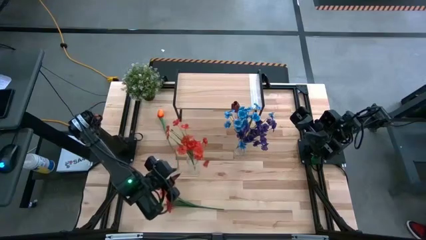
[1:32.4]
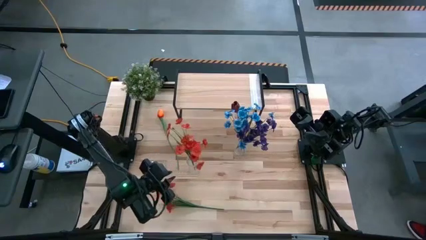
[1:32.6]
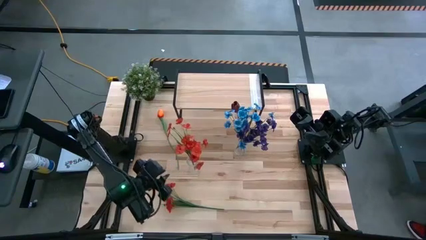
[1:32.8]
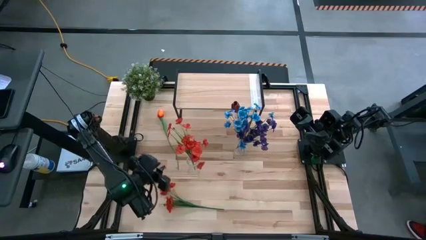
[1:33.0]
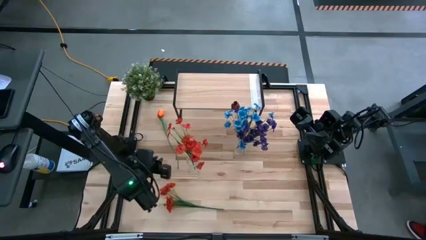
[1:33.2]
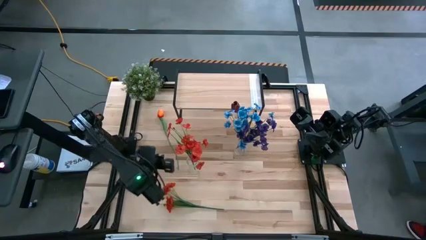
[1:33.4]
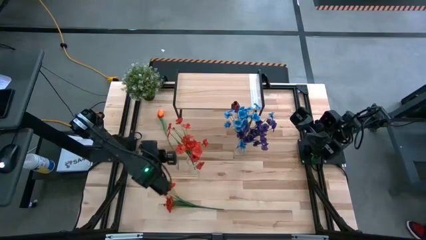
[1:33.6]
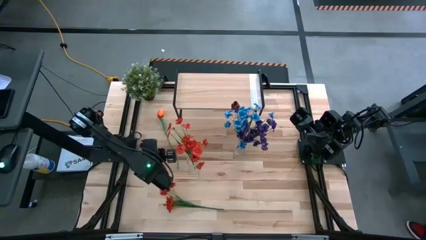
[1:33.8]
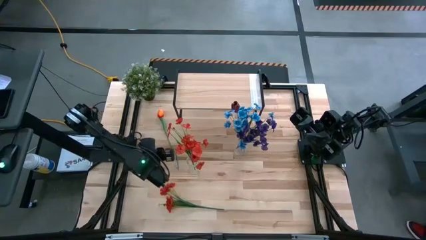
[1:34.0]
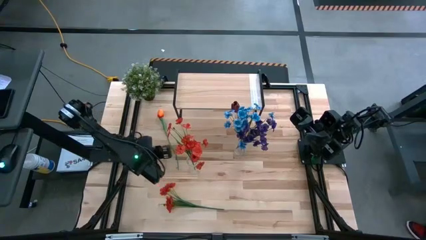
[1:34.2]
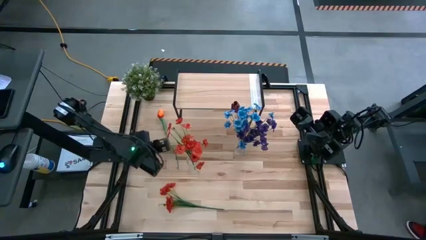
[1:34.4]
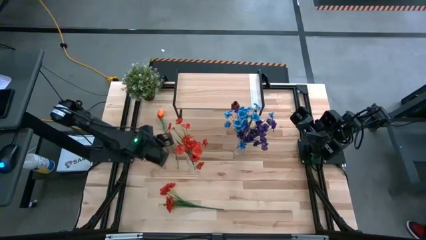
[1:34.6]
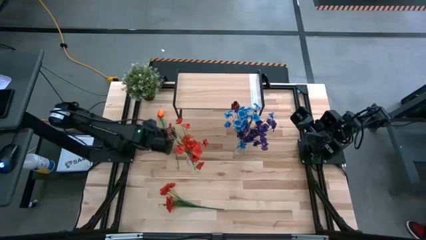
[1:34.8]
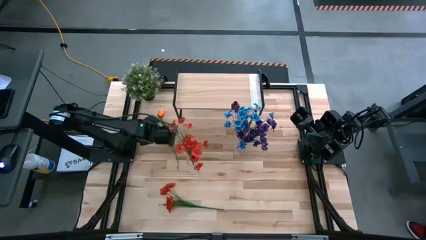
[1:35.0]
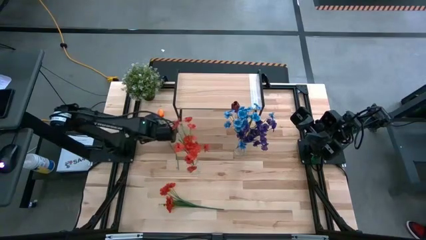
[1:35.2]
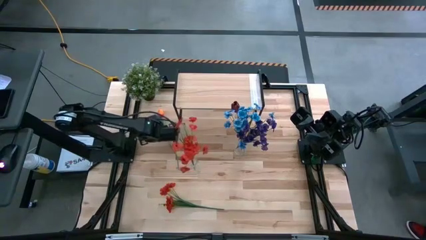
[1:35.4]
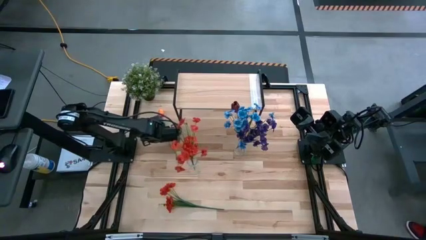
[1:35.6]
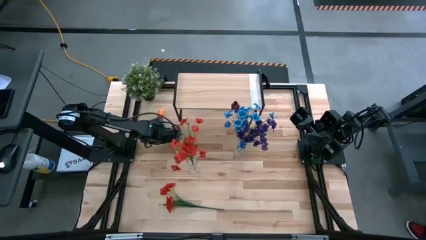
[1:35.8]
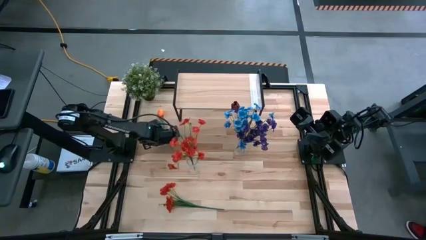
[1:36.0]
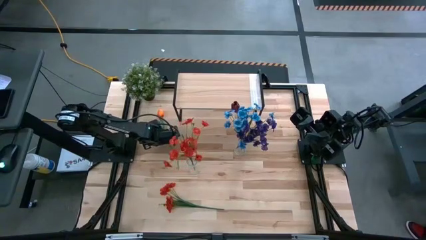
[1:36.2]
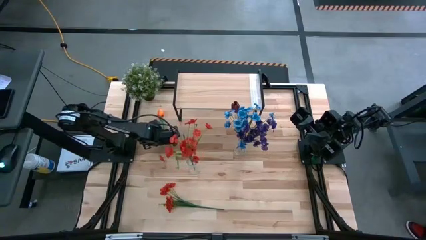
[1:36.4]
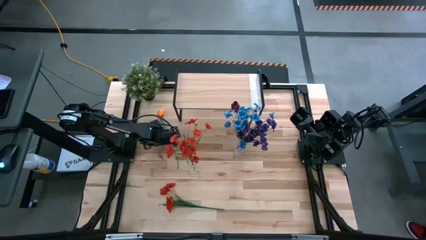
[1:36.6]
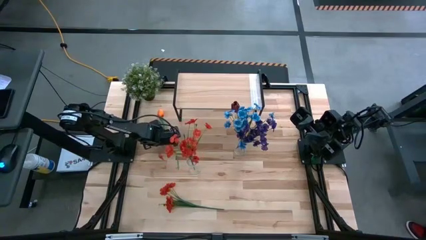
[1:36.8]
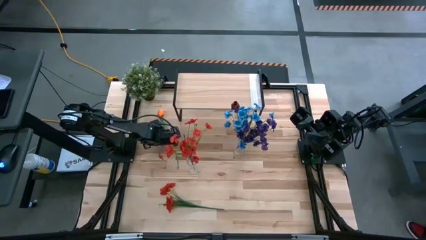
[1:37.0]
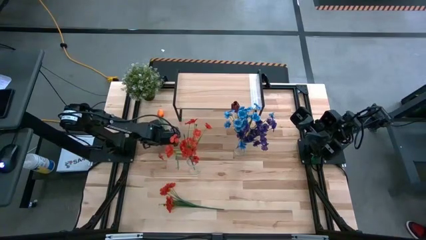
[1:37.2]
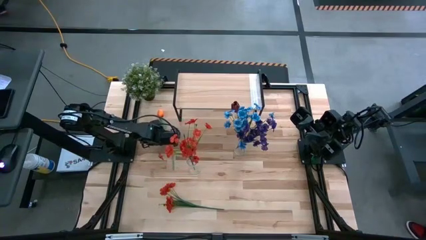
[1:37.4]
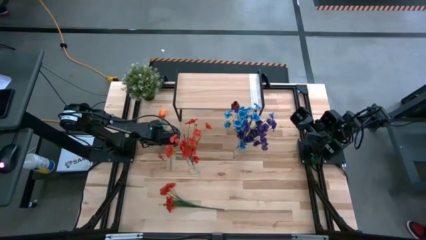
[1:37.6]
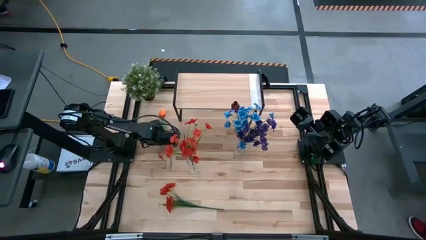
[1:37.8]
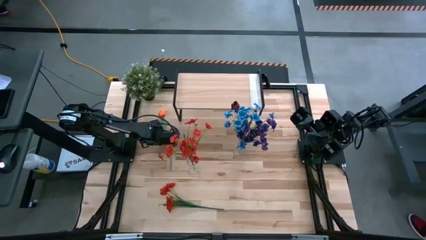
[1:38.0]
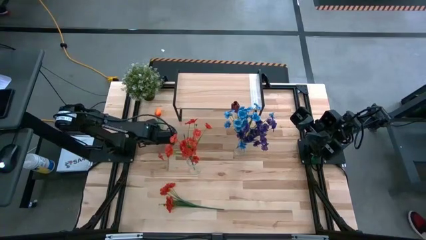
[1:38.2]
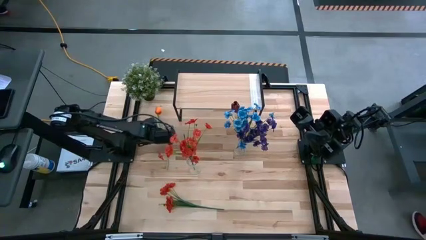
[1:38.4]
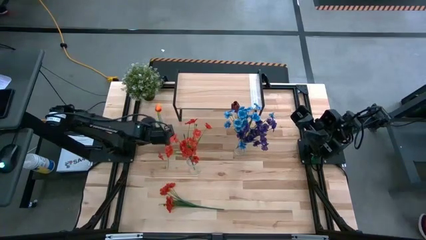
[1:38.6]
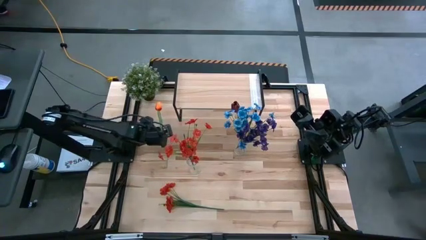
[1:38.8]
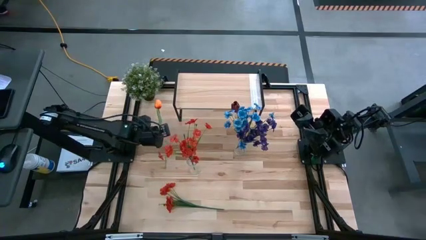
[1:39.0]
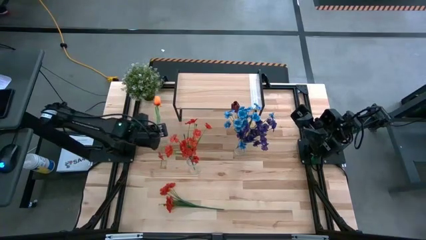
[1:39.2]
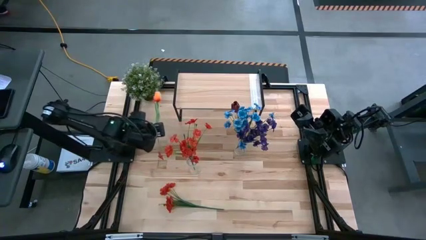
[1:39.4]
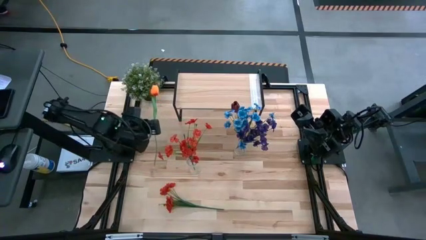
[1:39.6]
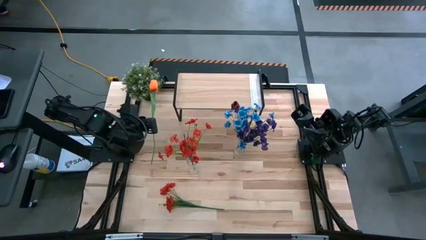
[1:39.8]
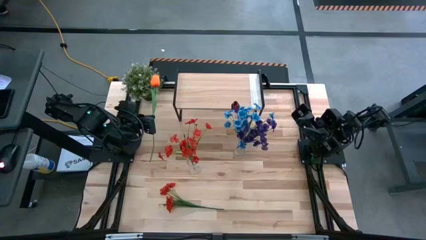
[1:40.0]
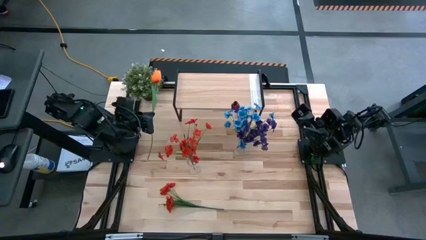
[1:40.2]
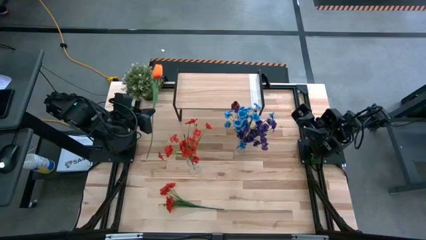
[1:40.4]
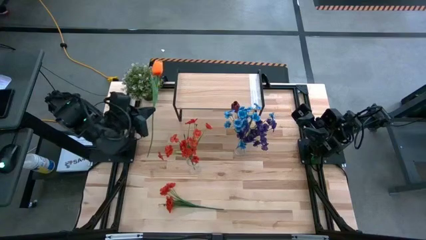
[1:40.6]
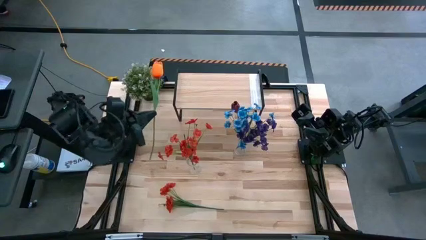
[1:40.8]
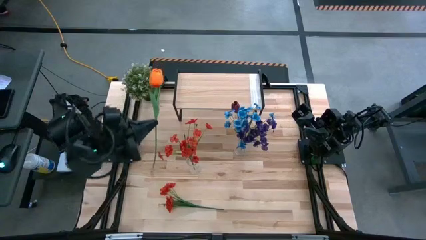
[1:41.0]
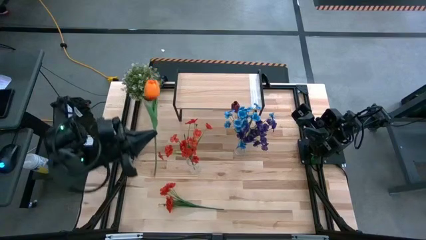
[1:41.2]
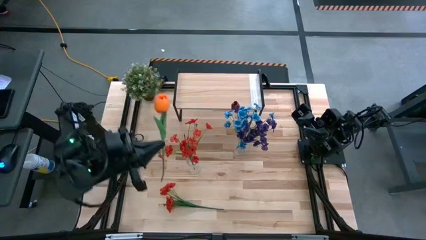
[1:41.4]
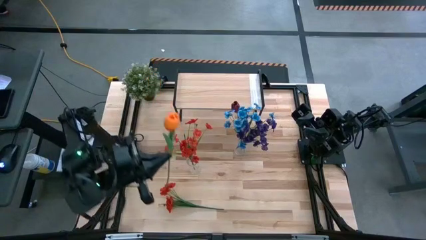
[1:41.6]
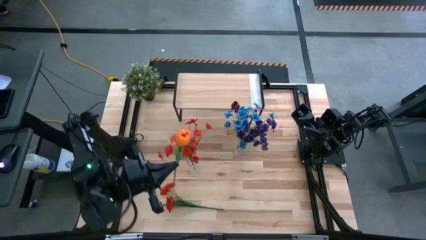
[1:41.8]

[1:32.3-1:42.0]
Task: Pick and place flowers into a vace then onto a shelf
Put the orange tulip into the left transparent vase

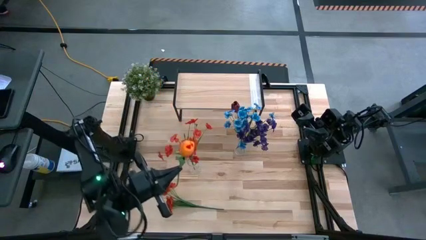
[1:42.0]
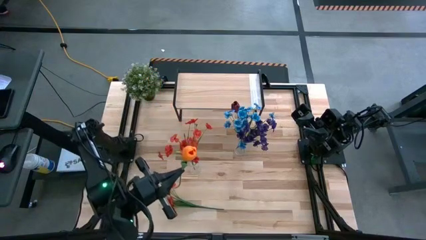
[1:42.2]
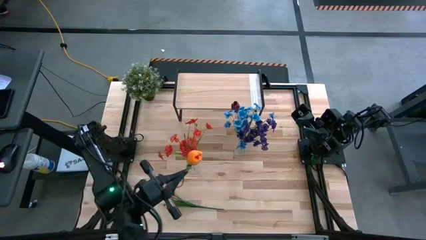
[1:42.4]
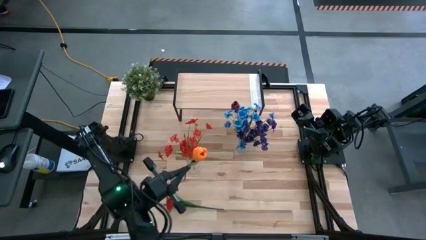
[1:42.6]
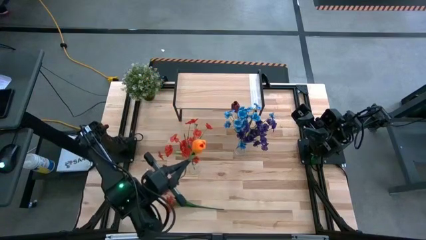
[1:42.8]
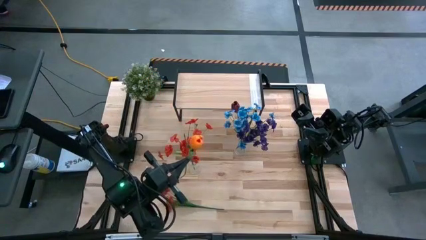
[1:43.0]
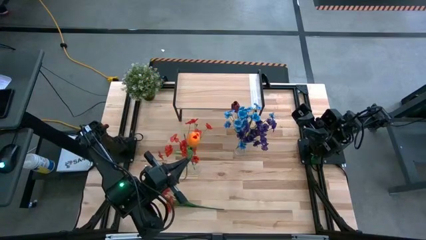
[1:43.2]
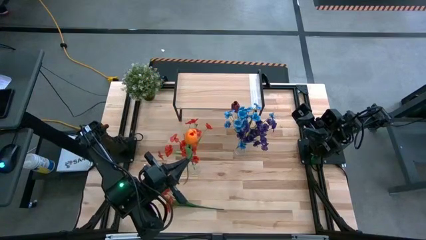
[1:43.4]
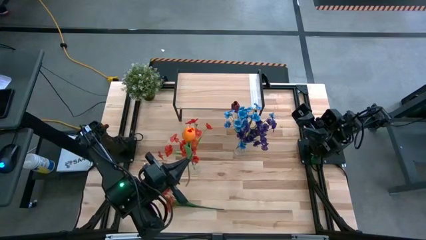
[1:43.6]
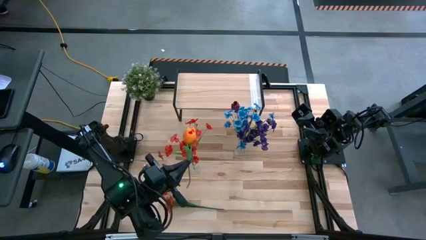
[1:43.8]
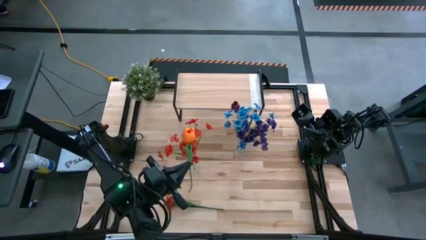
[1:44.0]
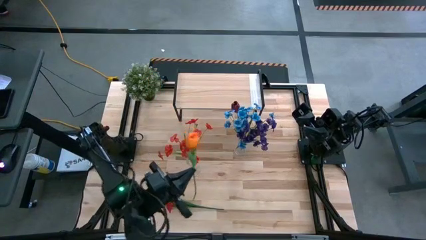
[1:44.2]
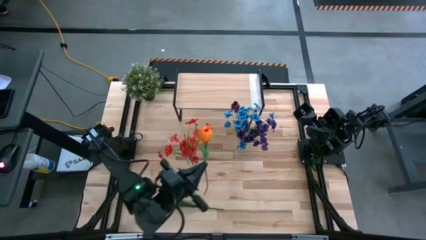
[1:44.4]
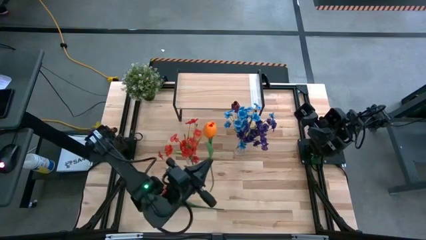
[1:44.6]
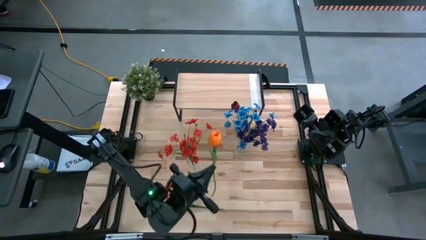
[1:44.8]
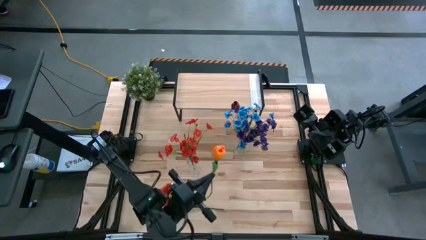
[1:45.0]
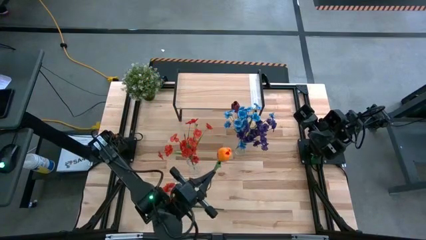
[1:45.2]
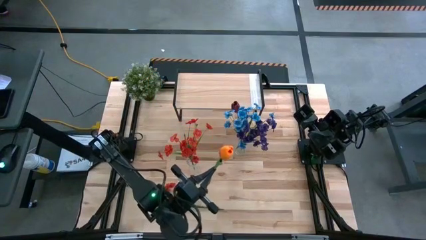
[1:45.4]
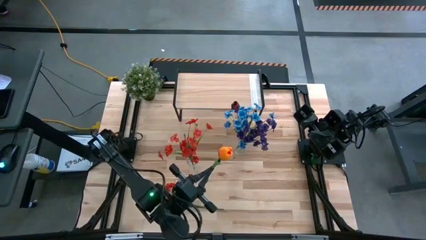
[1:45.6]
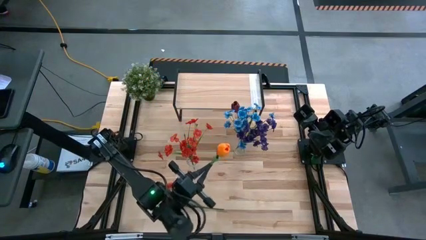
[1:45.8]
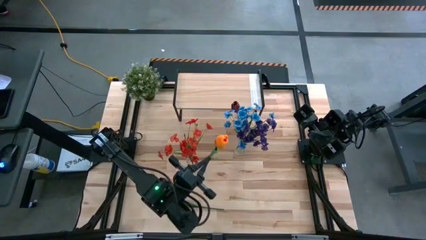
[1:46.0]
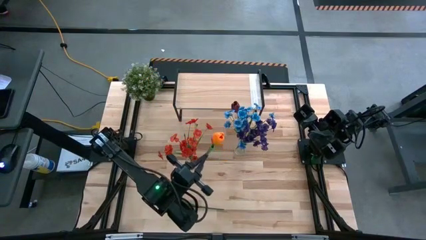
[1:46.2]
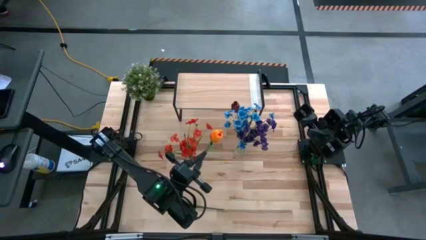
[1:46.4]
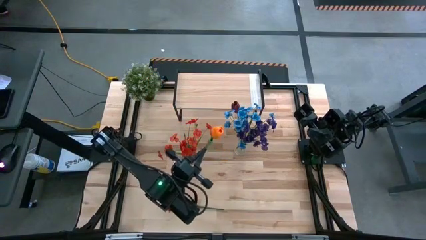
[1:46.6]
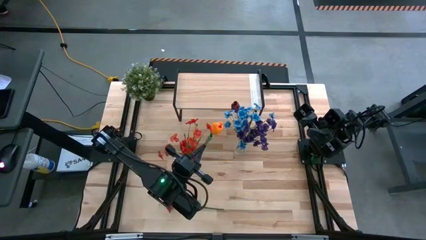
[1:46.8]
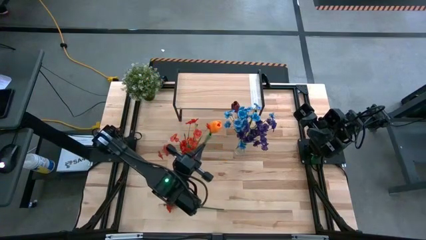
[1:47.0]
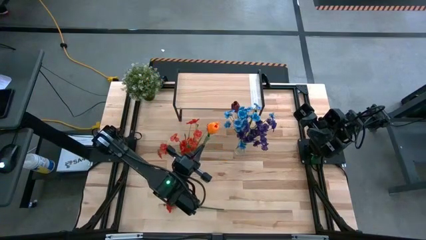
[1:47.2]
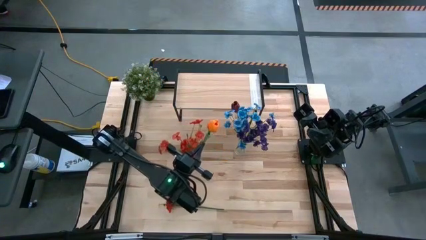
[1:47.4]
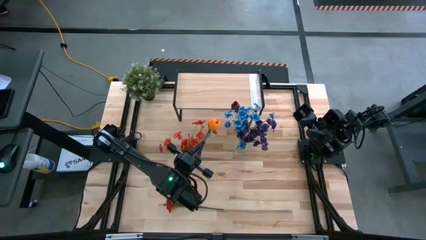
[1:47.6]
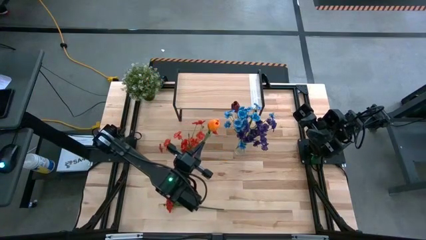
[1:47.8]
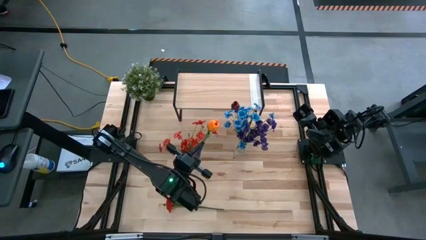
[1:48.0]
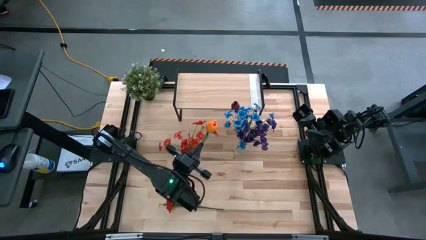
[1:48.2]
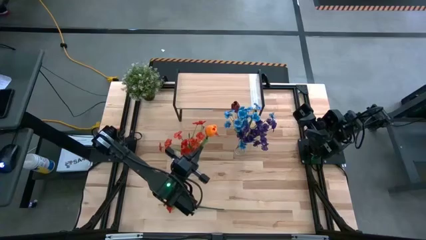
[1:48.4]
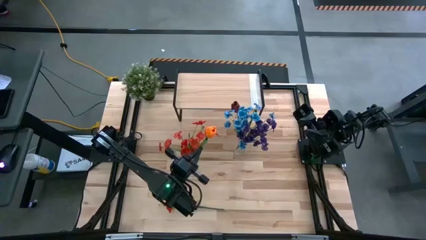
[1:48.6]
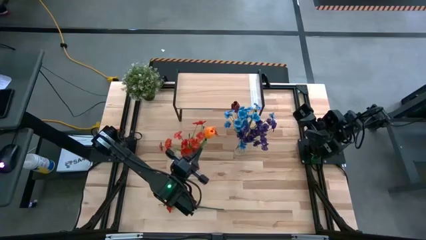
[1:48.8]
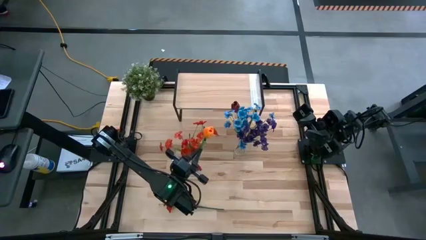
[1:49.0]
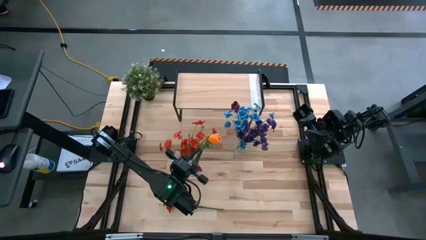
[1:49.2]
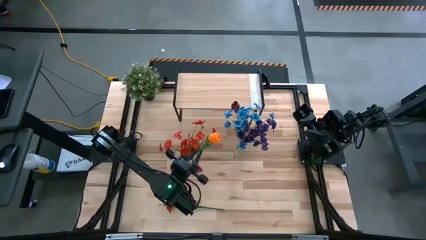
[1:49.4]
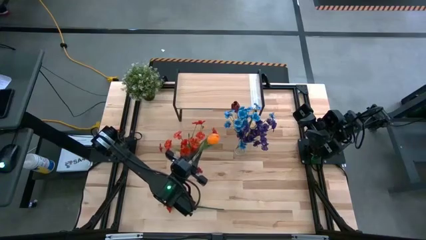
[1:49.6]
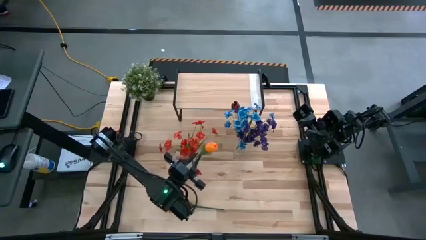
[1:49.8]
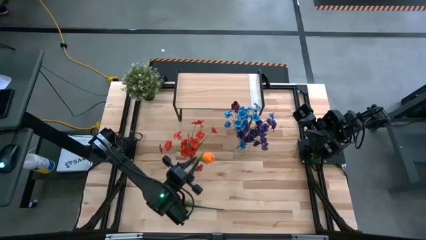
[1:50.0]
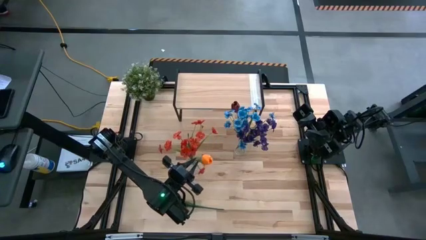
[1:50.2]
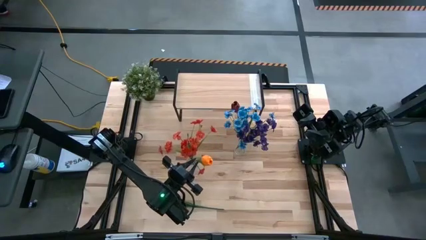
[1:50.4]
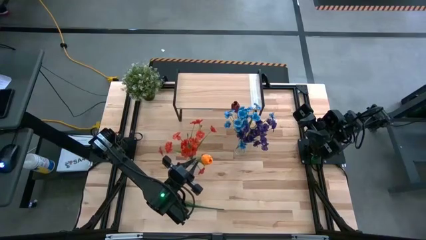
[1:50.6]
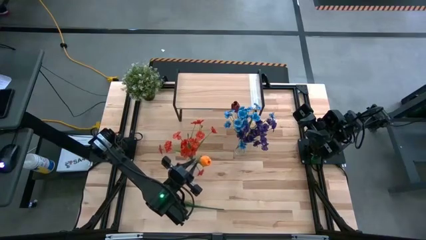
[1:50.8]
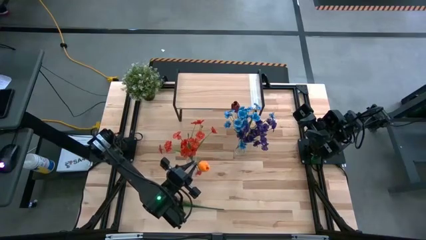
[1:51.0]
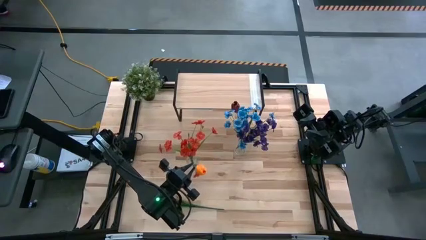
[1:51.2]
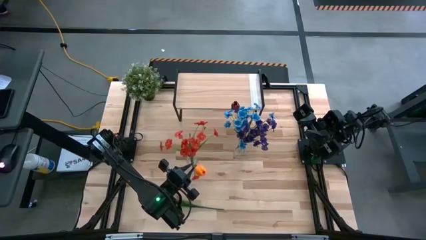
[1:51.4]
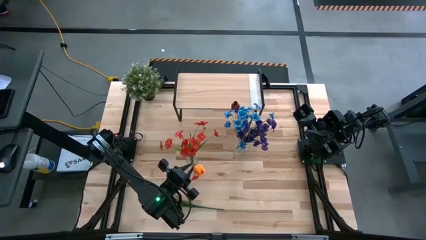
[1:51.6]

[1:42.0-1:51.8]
Put the orange tulip into the left transparent vase
